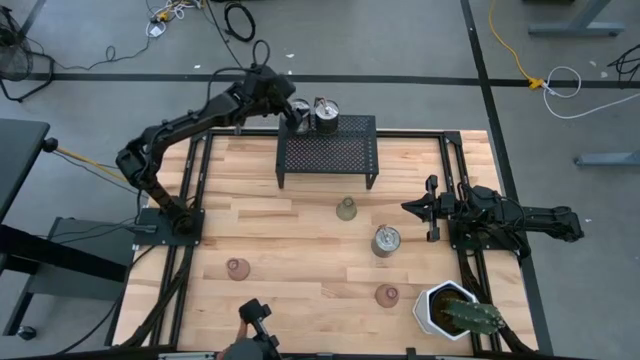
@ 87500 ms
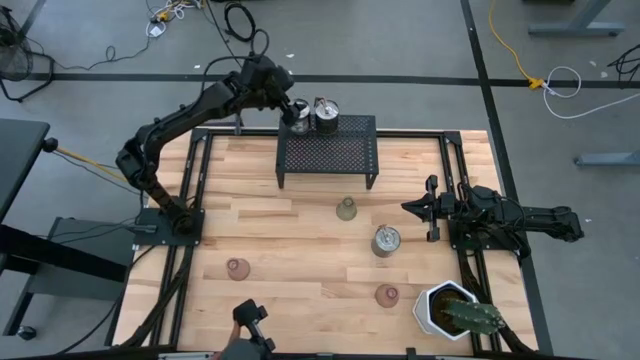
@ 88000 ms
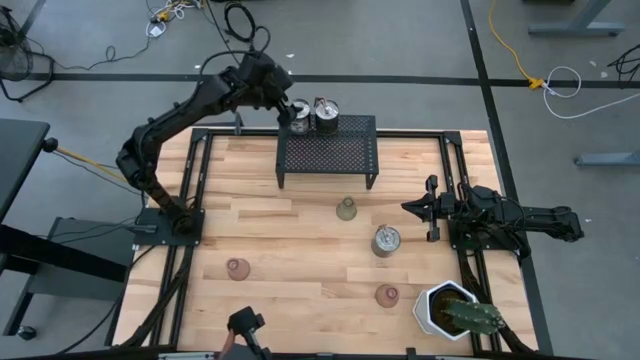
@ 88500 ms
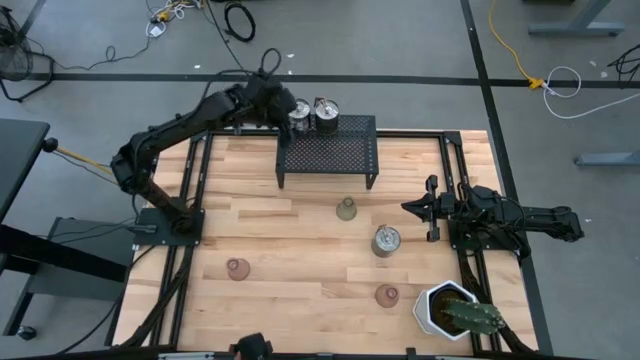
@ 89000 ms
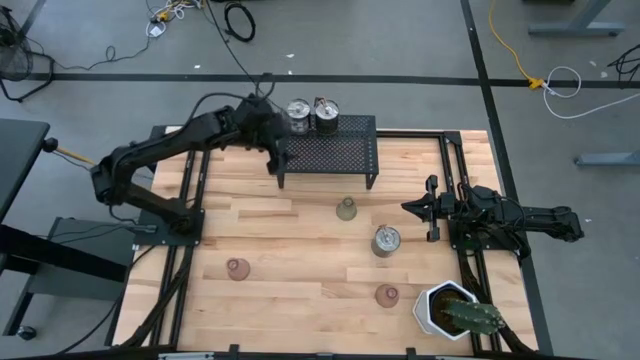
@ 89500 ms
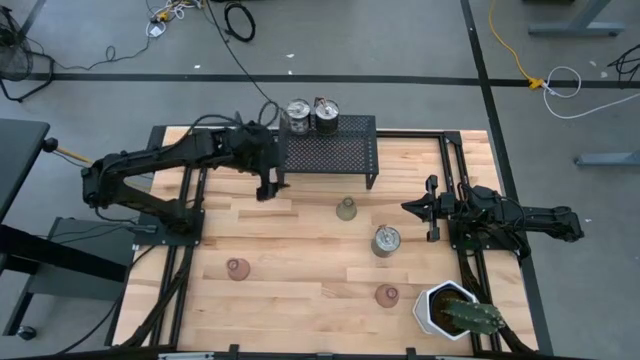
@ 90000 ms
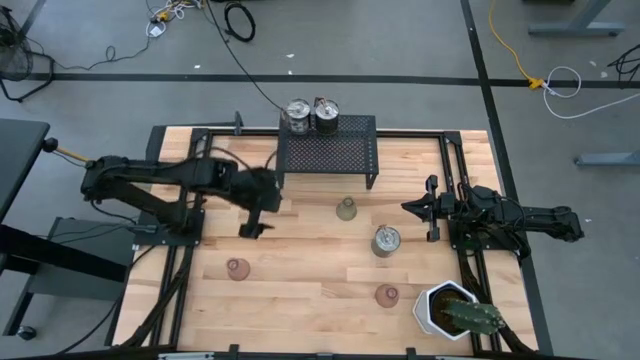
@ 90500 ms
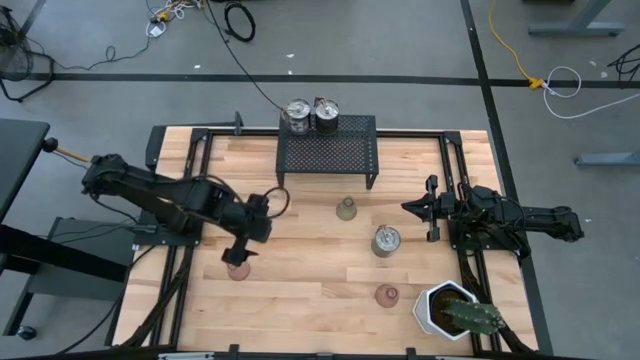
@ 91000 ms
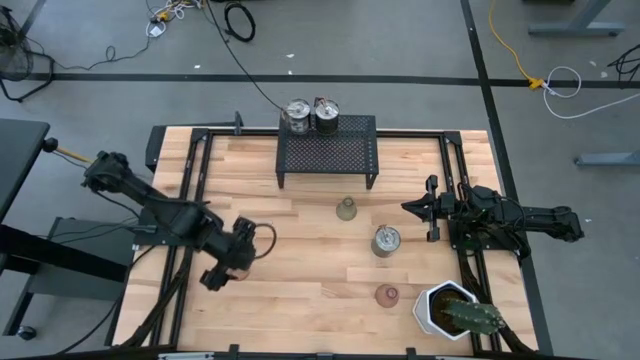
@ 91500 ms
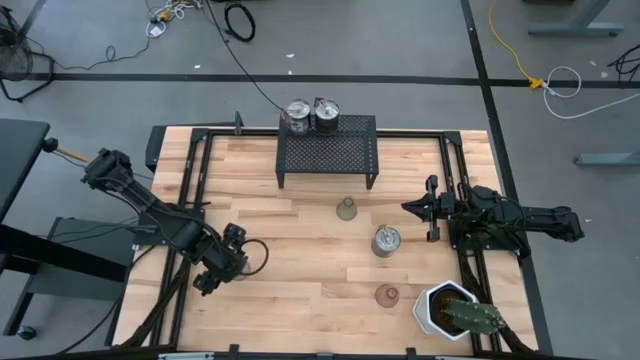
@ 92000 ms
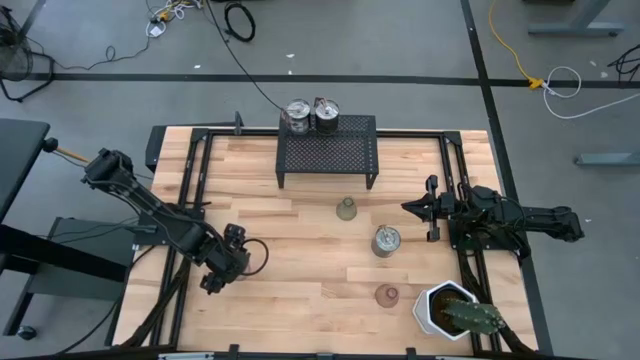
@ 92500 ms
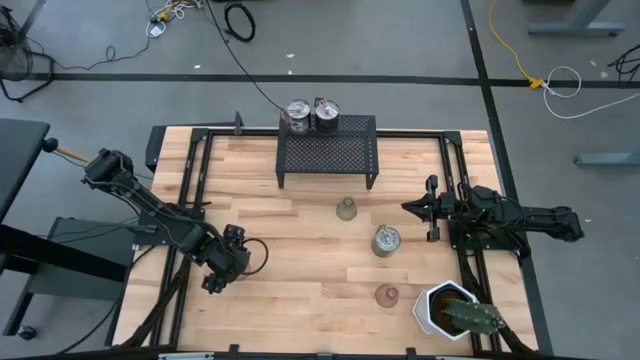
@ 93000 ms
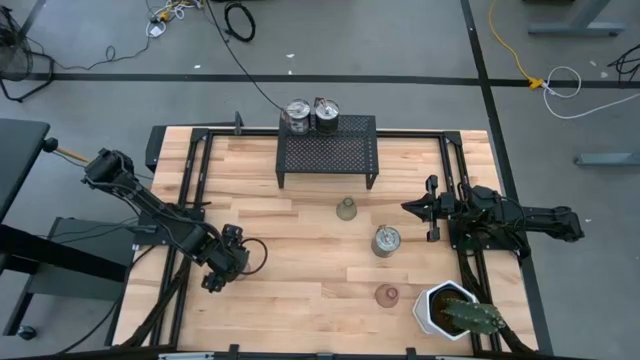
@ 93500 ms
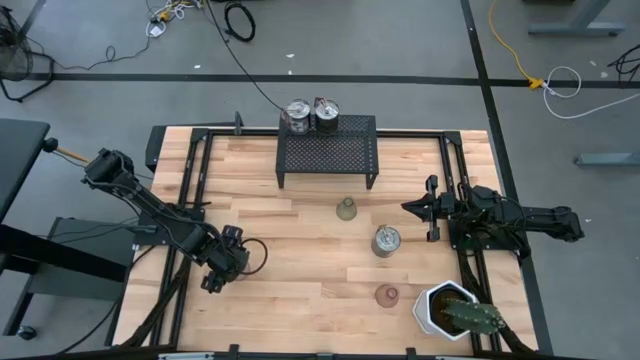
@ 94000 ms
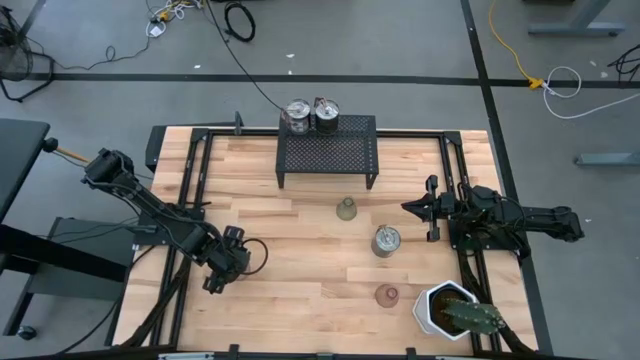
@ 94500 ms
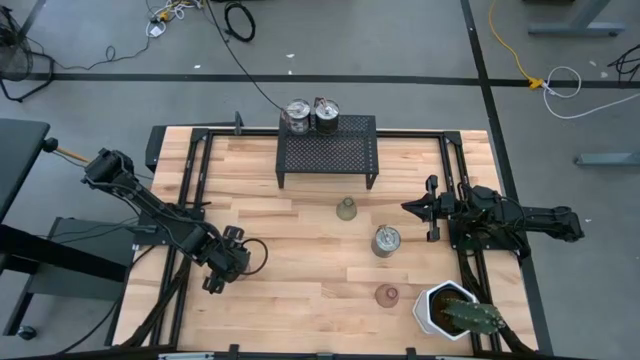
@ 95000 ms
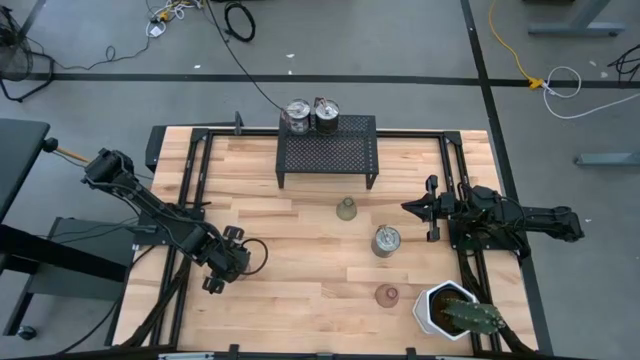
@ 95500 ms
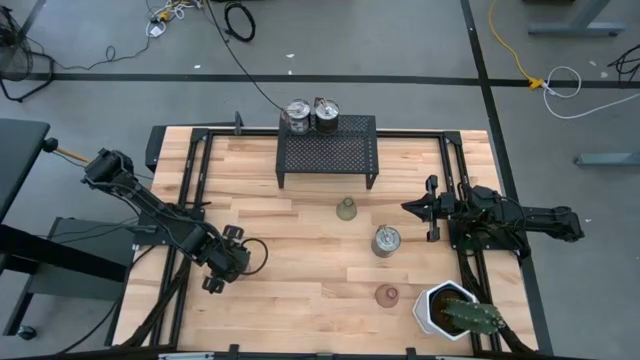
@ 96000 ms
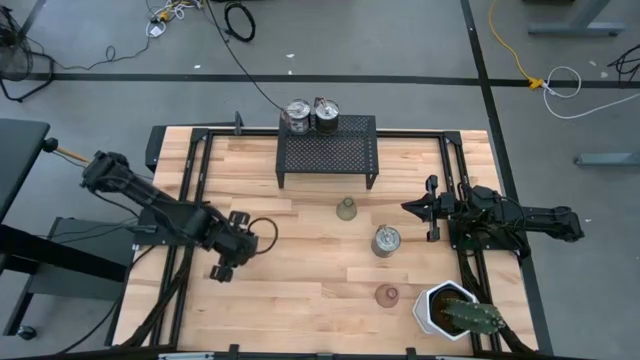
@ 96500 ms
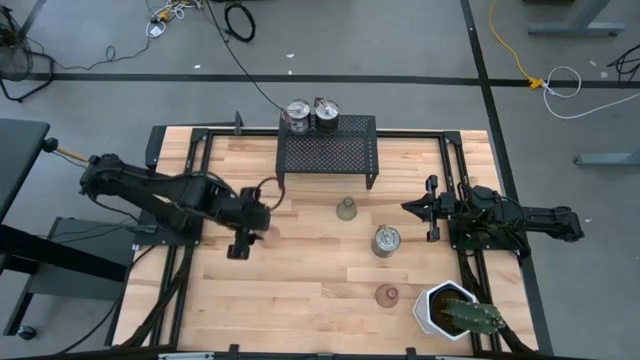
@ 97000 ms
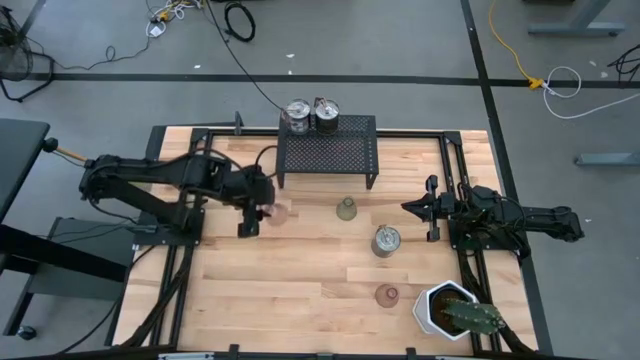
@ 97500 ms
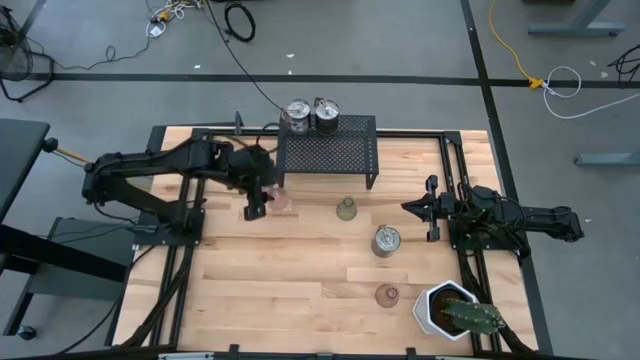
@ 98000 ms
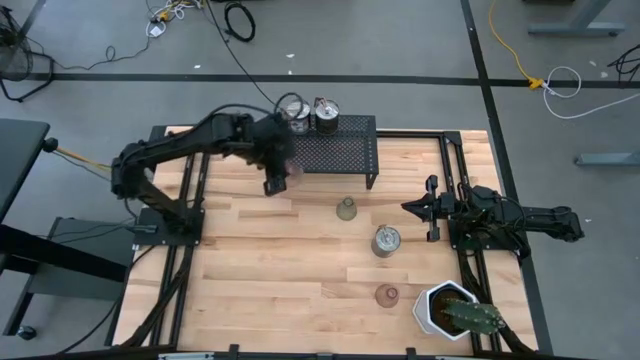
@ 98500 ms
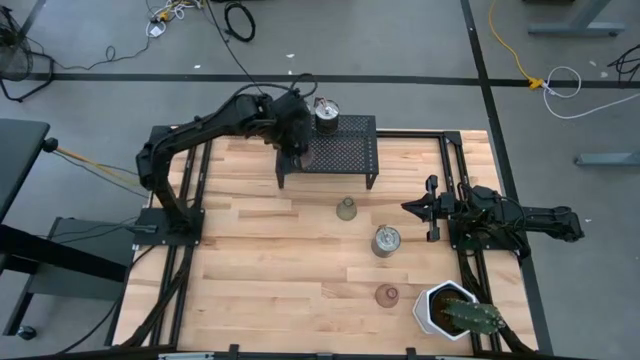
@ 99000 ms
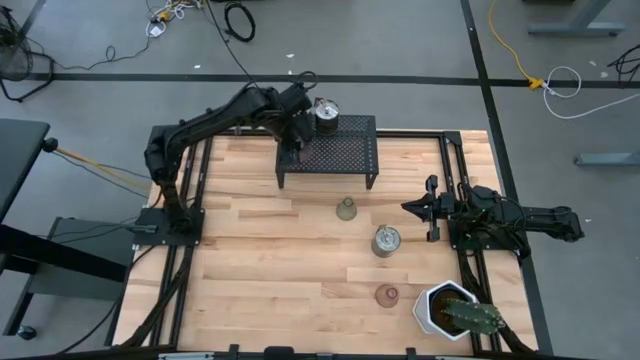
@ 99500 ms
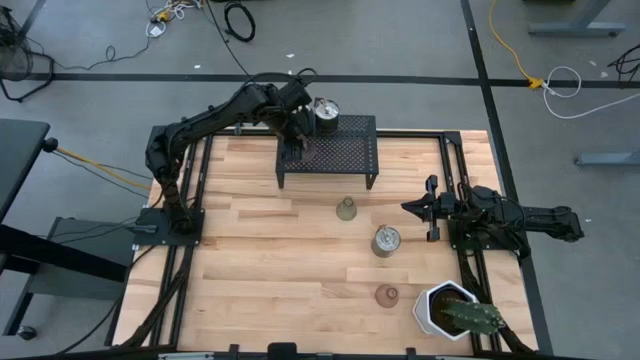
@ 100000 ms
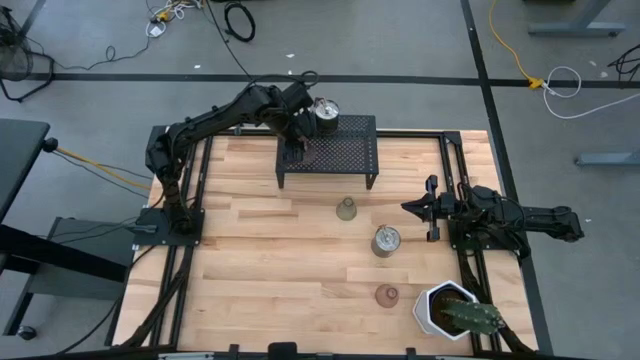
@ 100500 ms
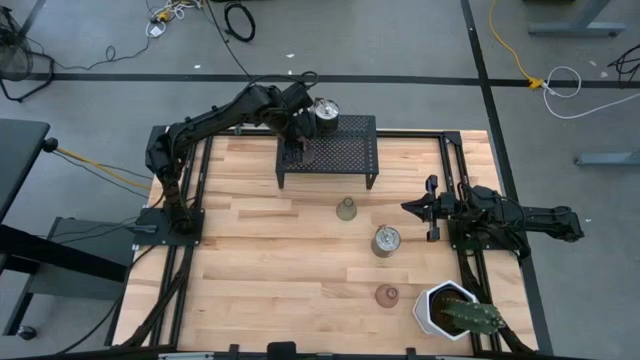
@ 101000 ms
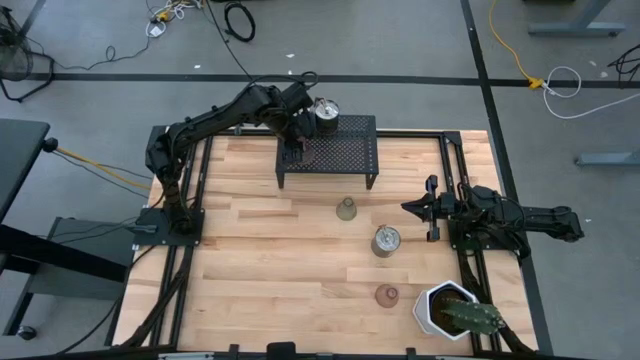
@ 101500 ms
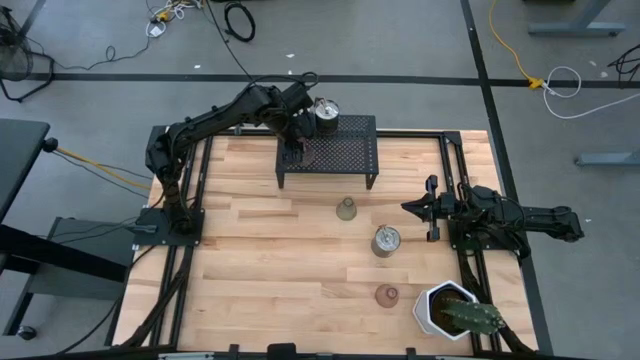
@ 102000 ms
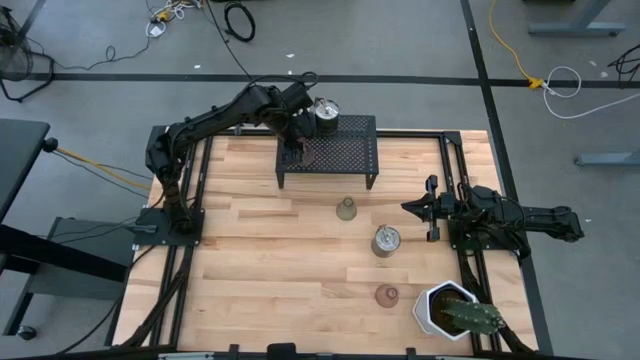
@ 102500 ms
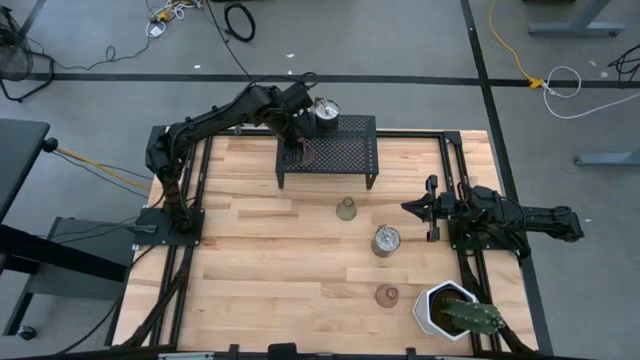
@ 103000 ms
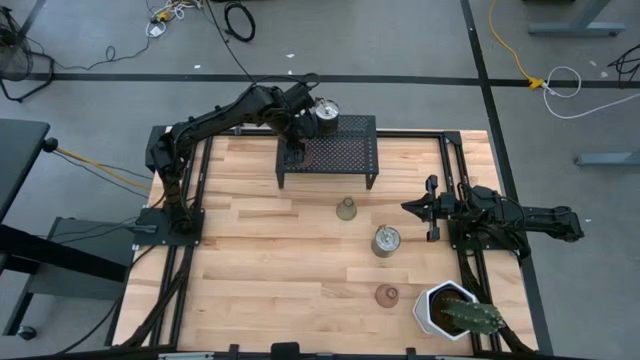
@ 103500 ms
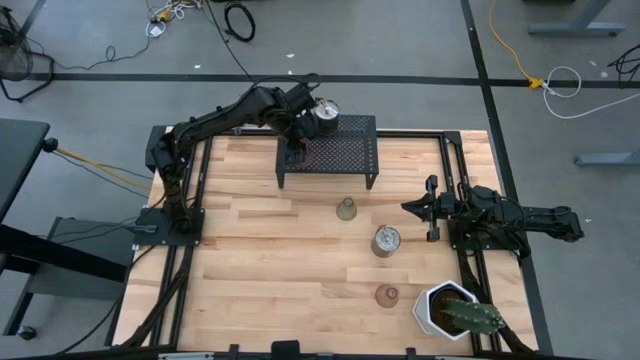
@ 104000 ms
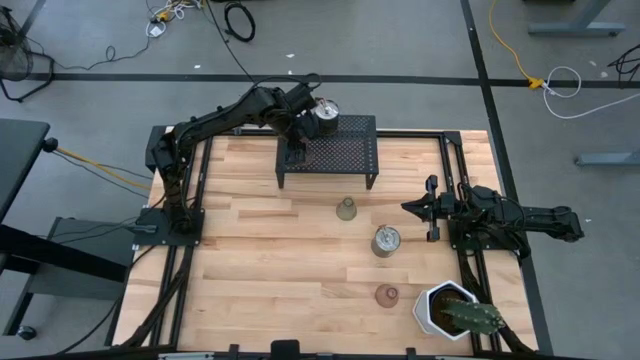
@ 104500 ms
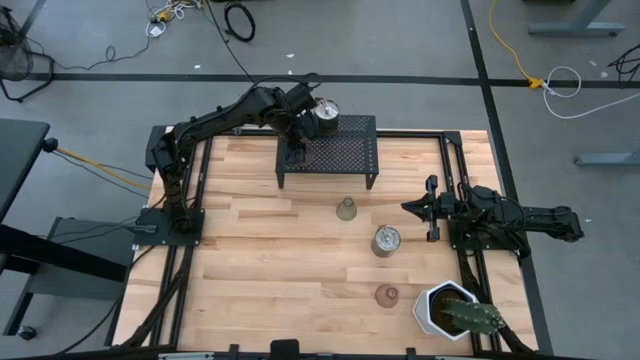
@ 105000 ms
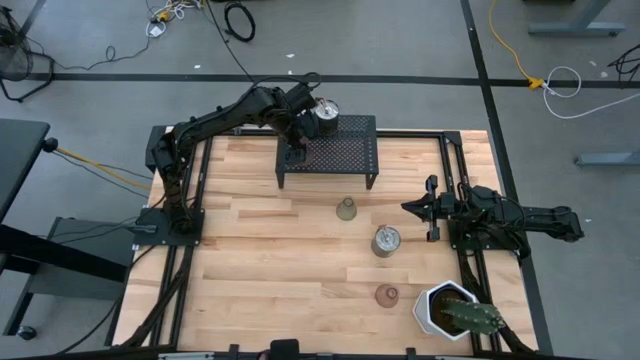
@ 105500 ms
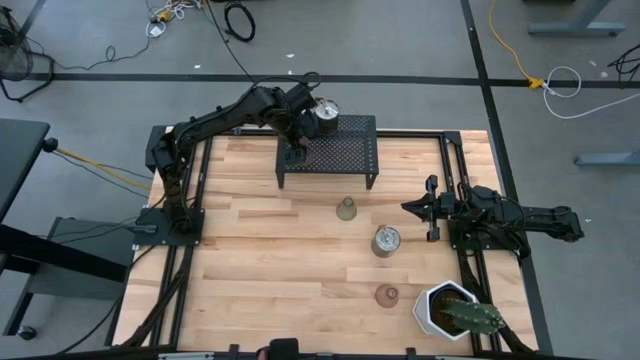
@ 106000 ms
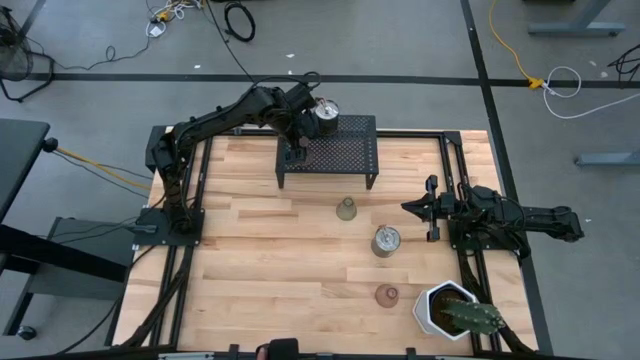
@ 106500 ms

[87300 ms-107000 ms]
Task: Pick & Place candle stick holders
Put the left pink vase candle holder on the shelf

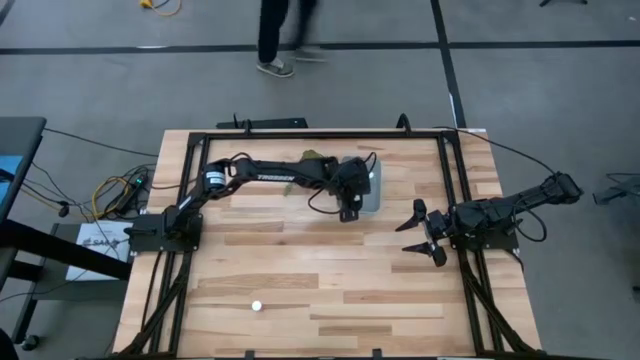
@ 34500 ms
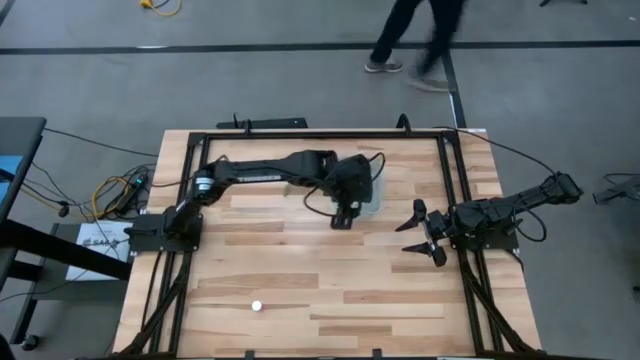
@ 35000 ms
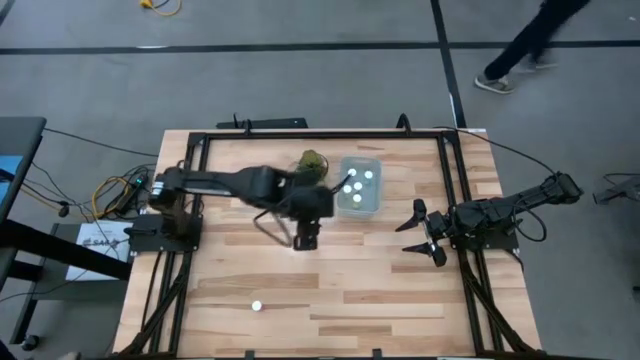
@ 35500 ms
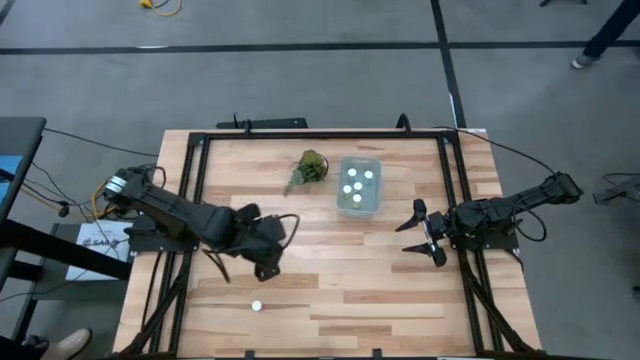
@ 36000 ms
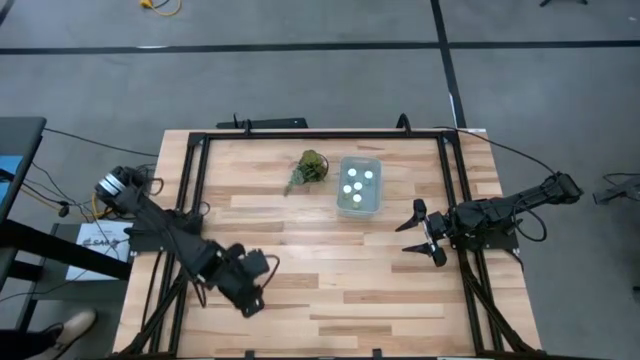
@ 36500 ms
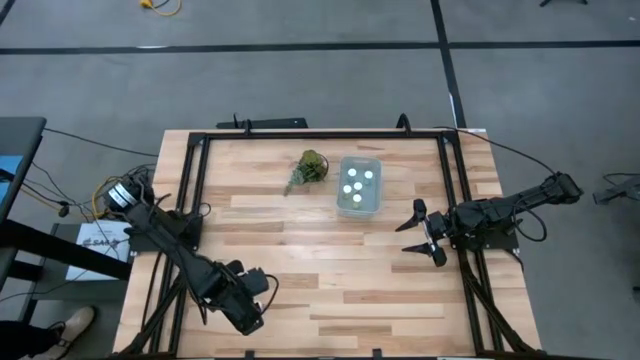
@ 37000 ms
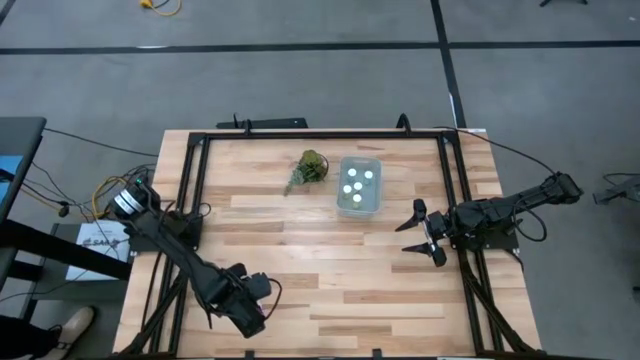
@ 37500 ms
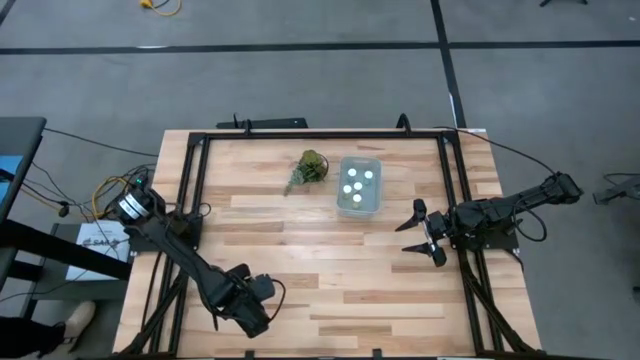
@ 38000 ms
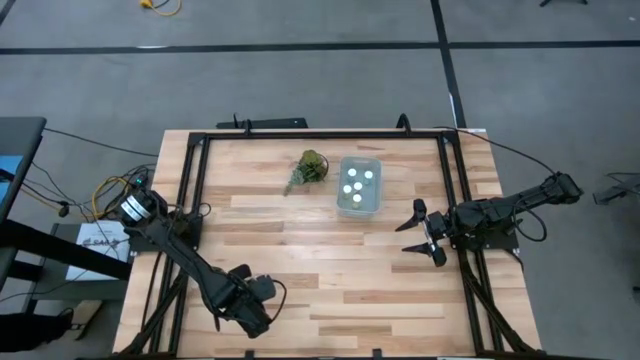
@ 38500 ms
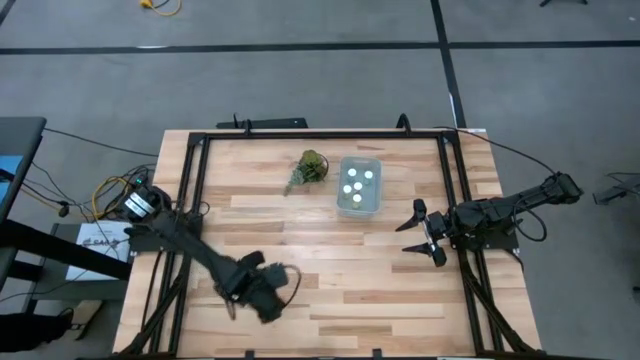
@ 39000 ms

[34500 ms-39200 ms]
Task: Pick and place pill bottles into a basket
Put the pink pill bottle into the gray bin
